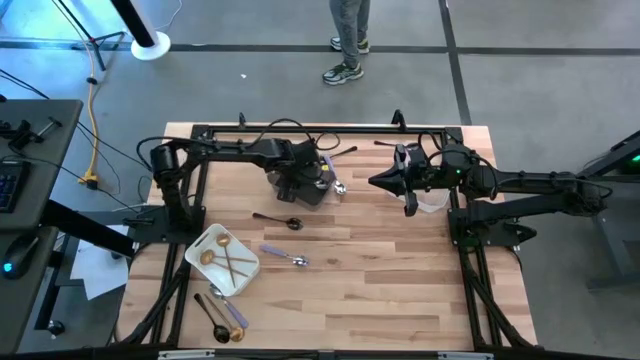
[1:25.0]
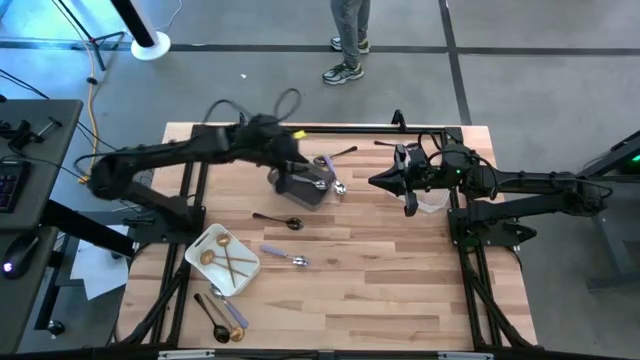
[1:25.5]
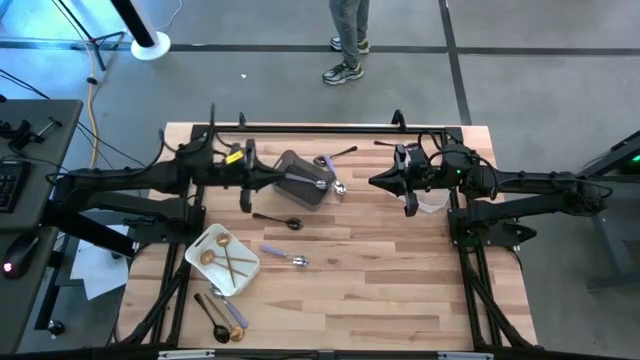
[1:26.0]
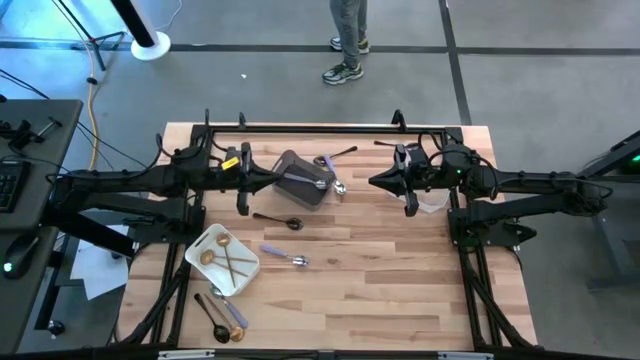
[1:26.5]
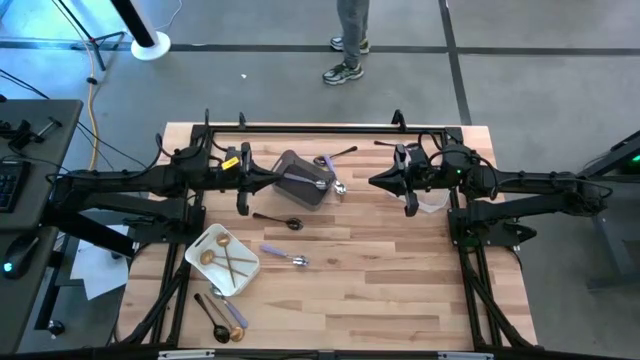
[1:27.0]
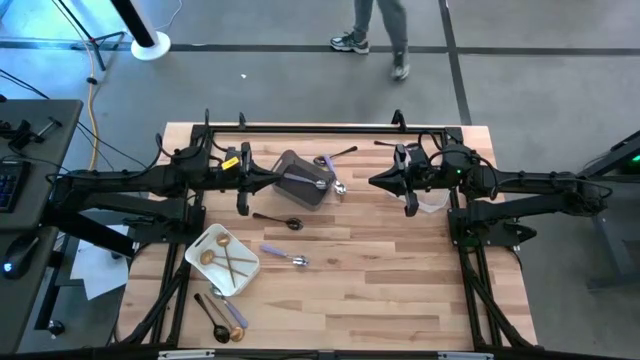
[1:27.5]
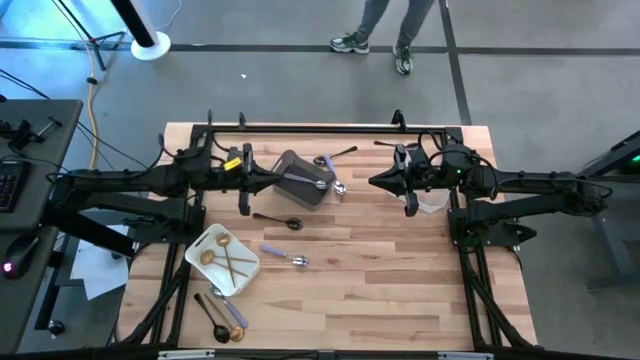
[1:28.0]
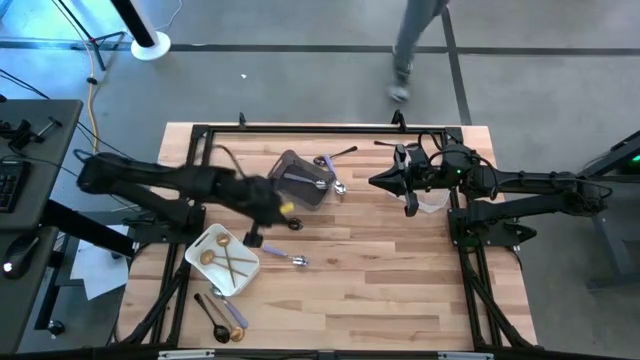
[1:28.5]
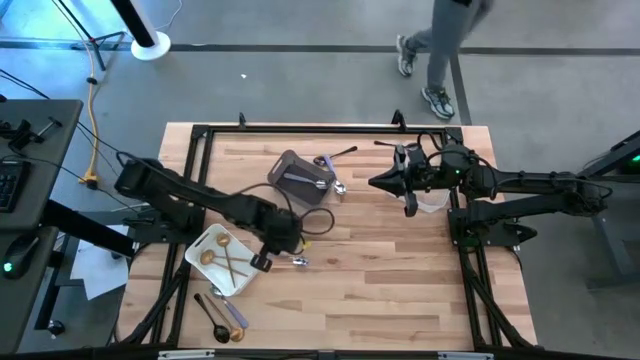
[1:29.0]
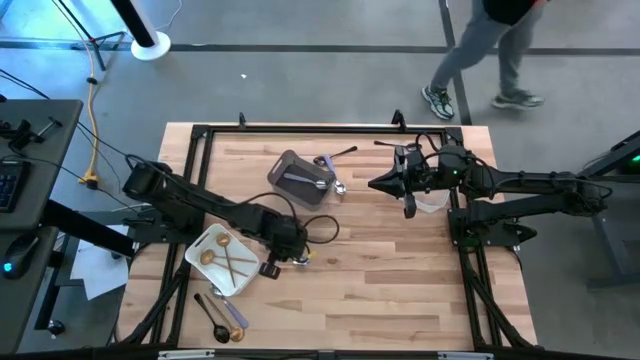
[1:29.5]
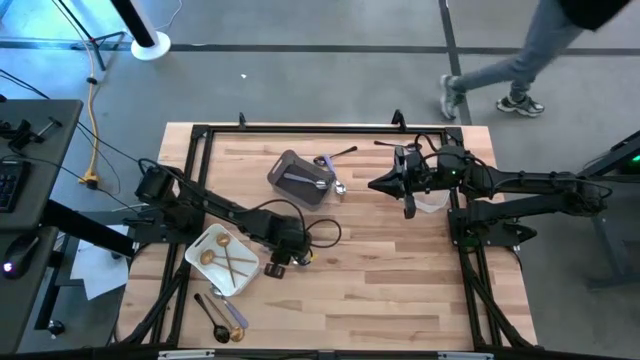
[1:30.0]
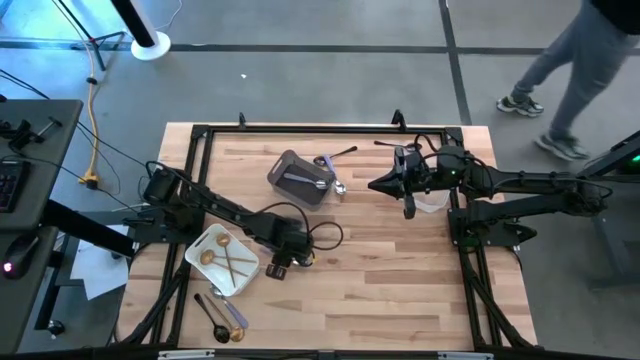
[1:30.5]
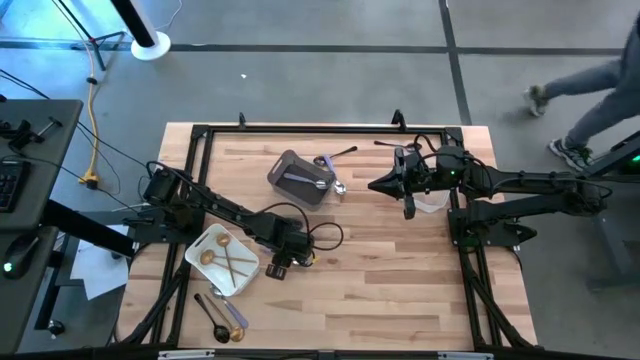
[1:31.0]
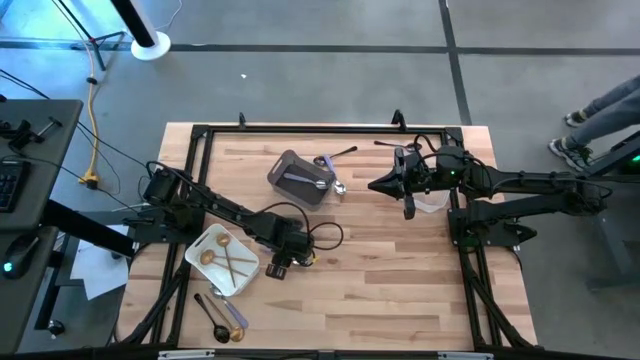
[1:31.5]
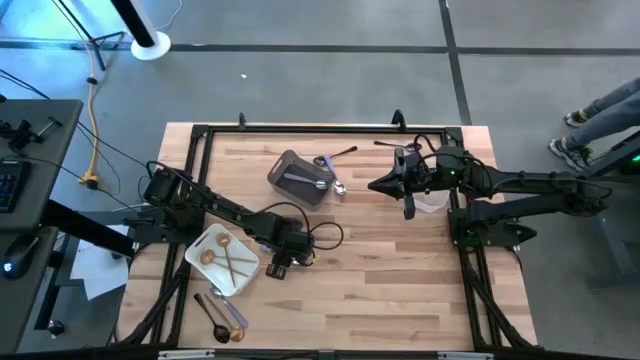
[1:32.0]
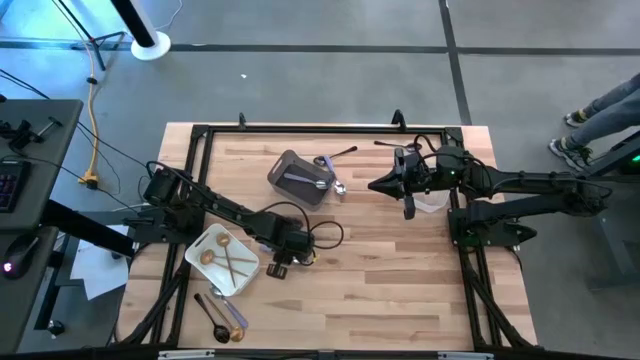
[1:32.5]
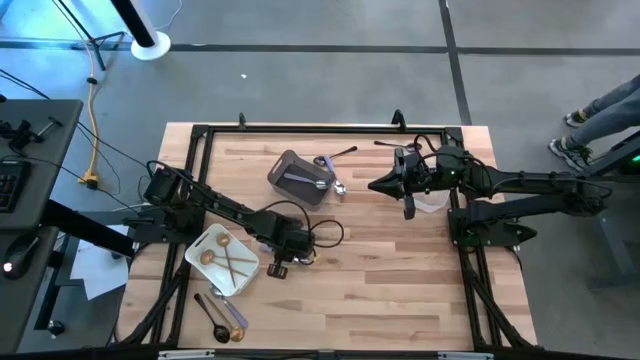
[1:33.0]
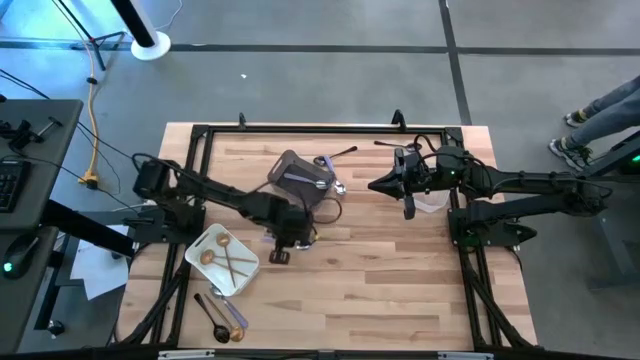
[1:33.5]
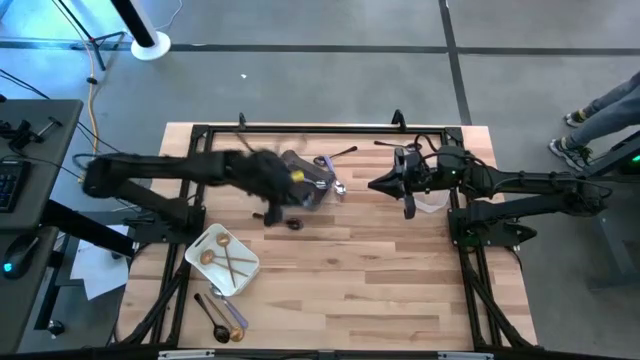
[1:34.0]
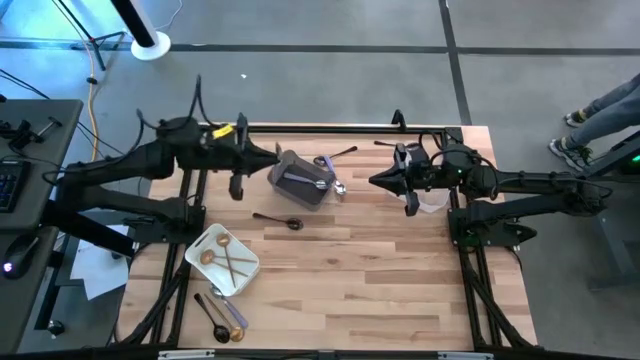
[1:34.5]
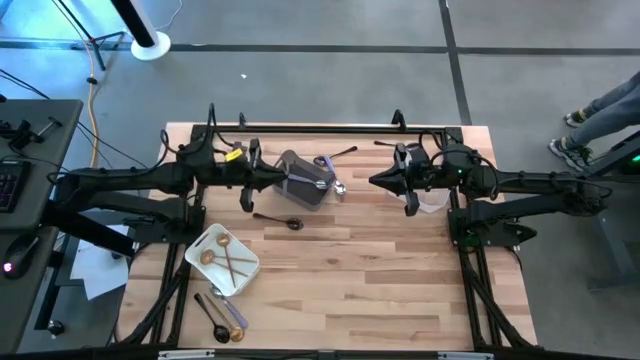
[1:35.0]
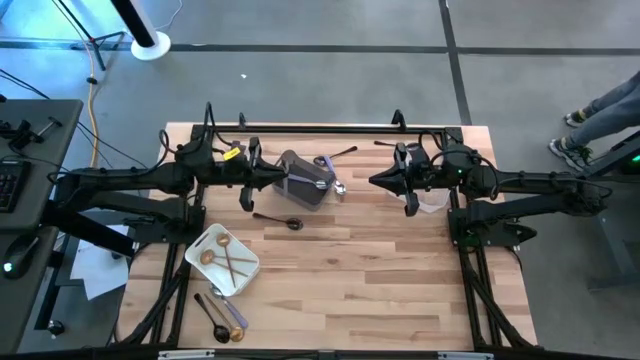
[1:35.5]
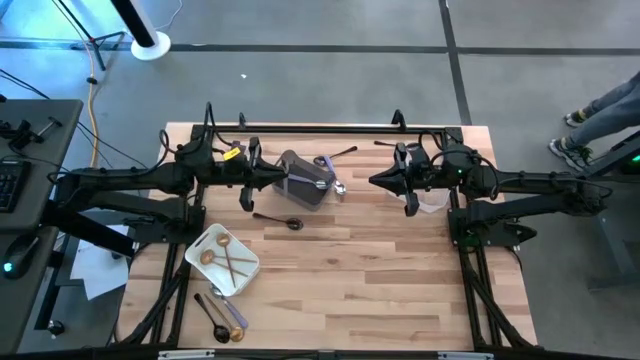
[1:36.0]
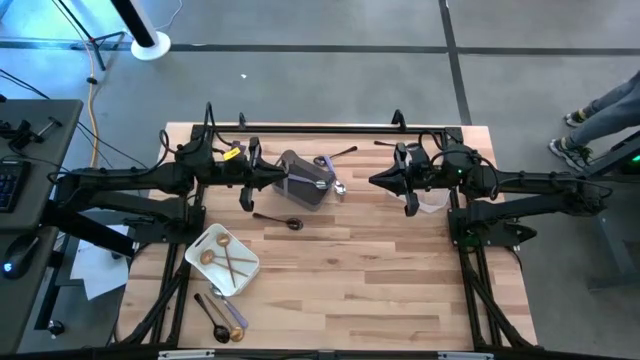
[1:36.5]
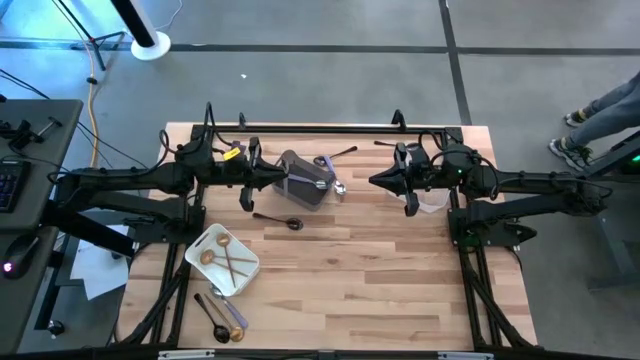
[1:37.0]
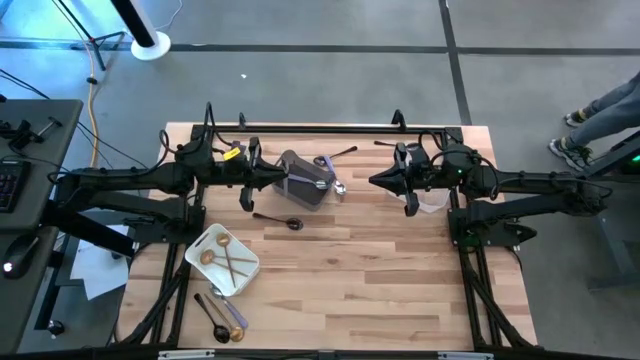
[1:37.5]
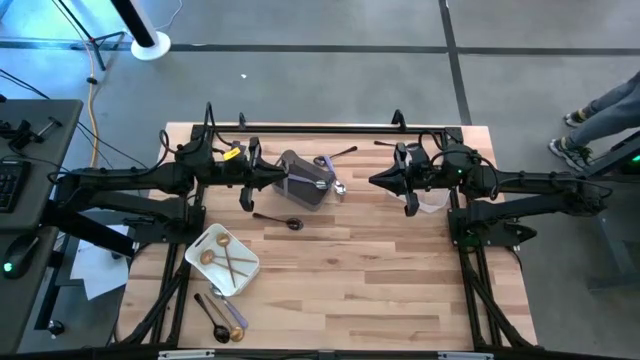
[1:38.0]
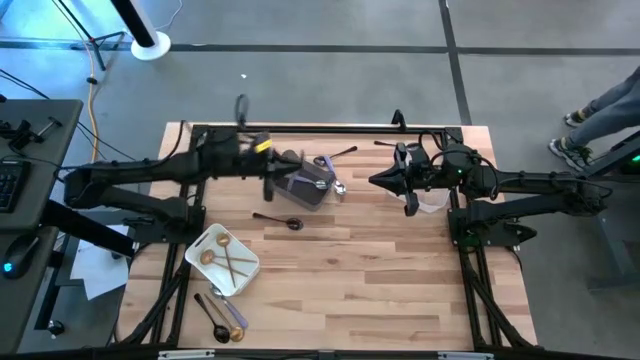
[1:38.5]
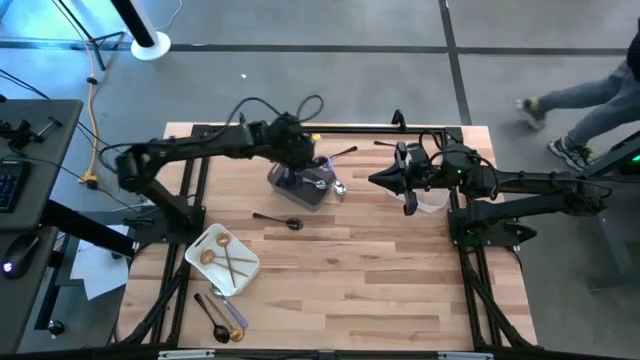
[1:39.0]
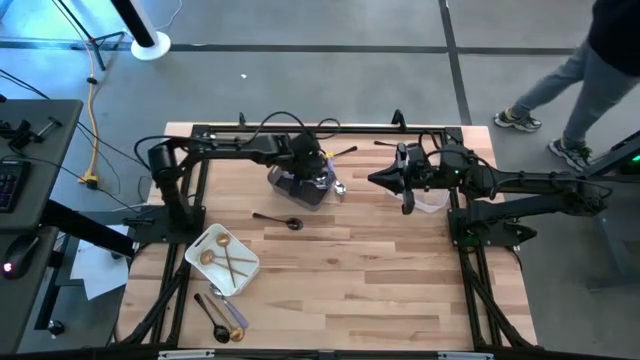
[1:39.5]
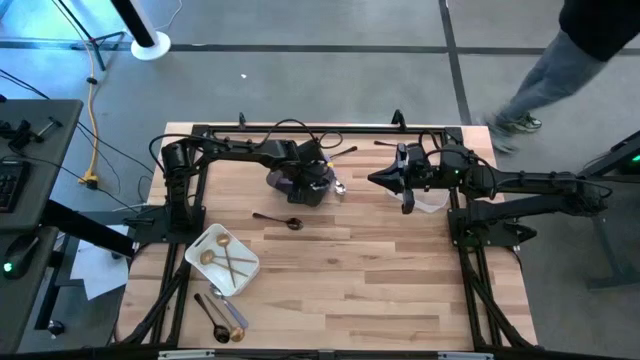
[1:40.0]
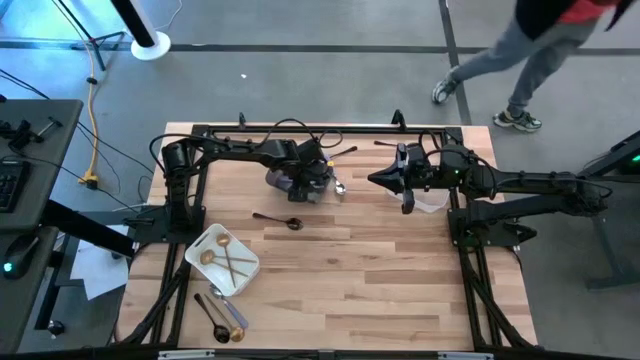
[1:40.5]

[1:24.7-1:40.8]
Task: Sort silverware by color (type)
Put the center purple spoon into the black bin

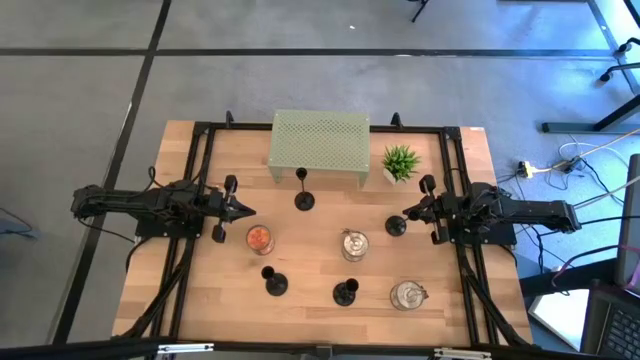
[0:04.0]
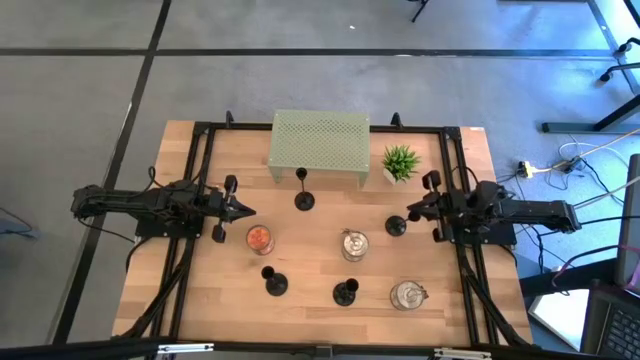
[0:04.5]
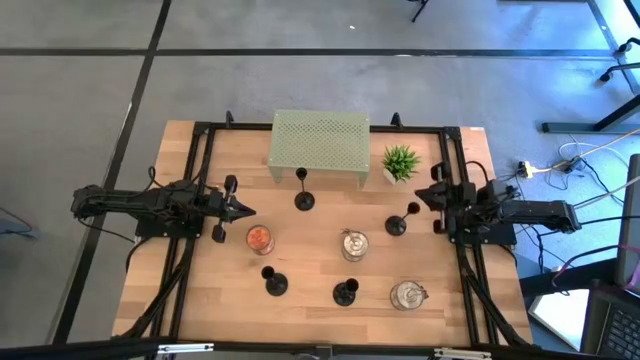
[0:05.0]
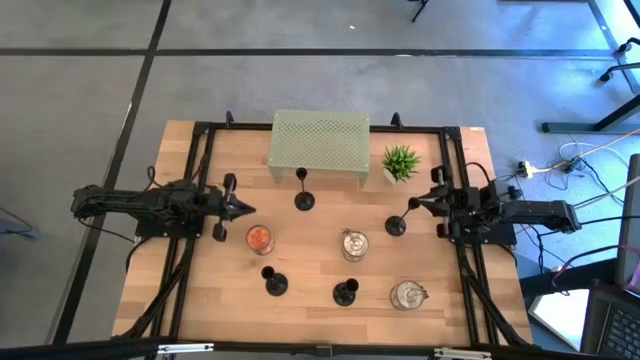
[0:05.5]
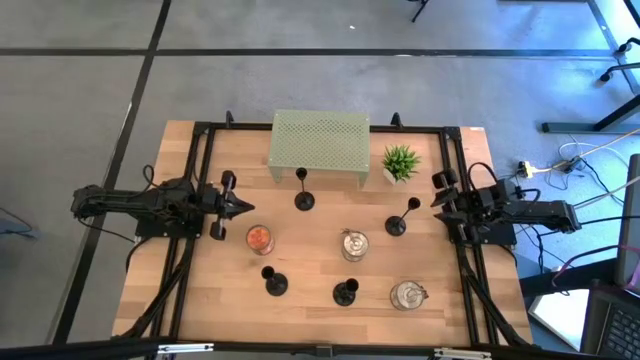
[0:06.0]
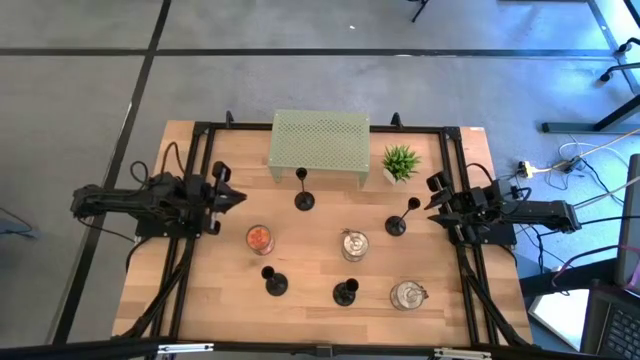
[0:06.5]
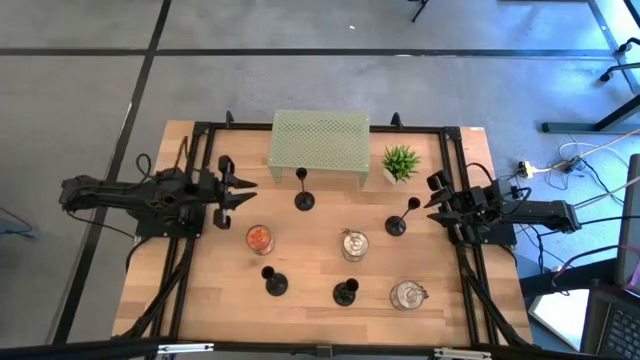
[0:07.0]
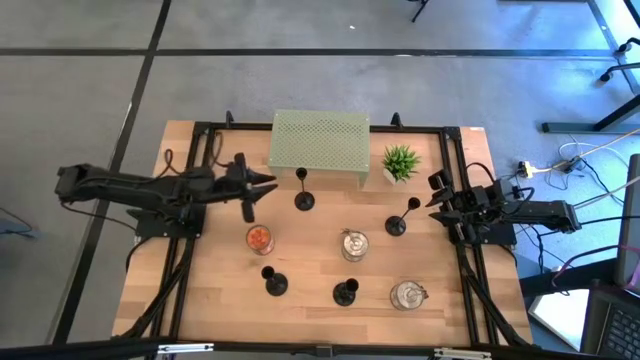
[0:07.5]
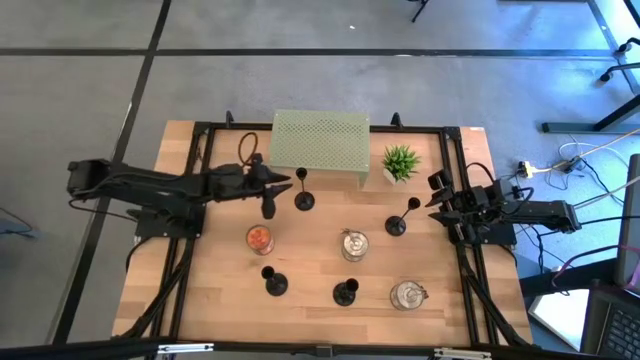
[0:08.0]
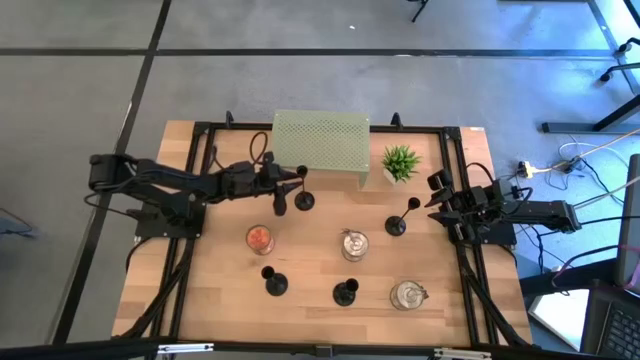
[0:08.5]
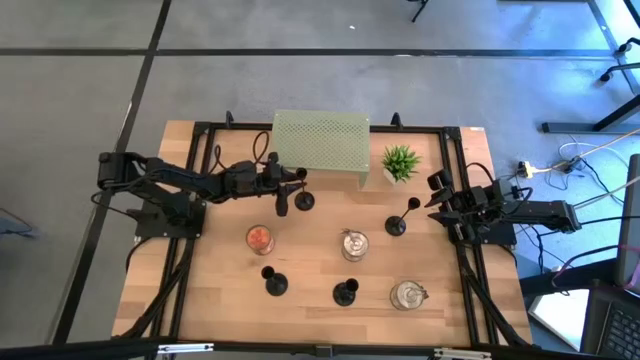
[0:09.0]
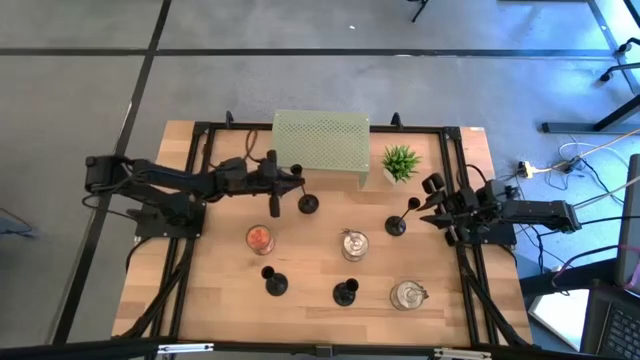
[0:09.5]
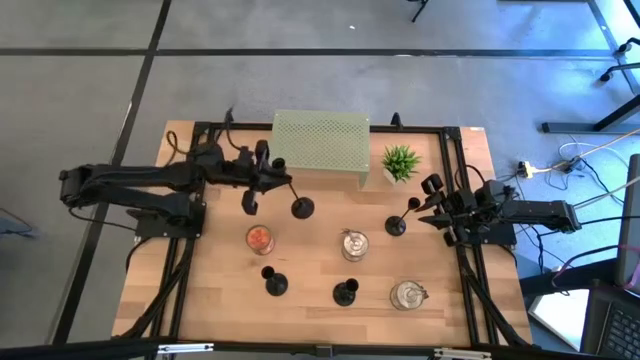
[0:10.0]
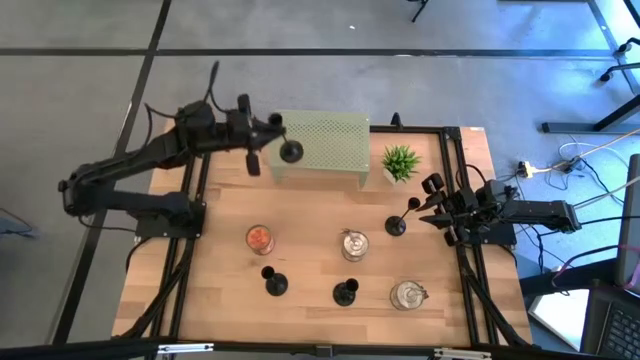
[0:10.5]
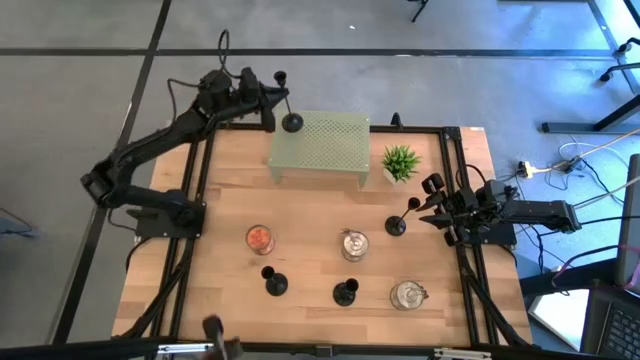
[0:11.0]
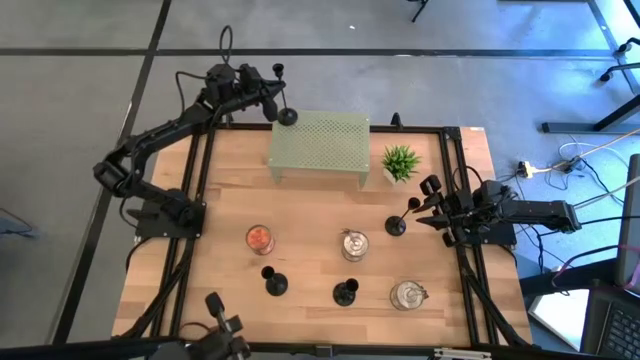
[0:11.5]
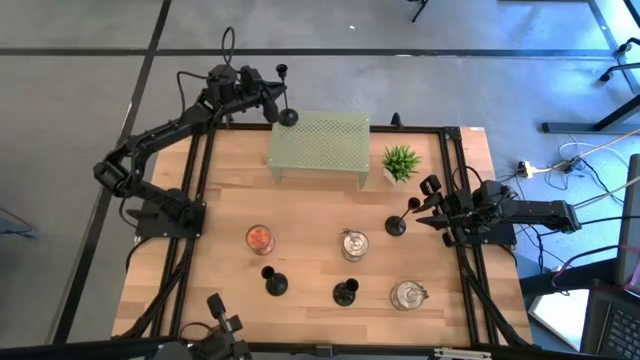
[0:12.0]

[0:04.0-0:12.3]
Task: Pick & Place candle stick holders
Put the top left candle holder on the shelf
